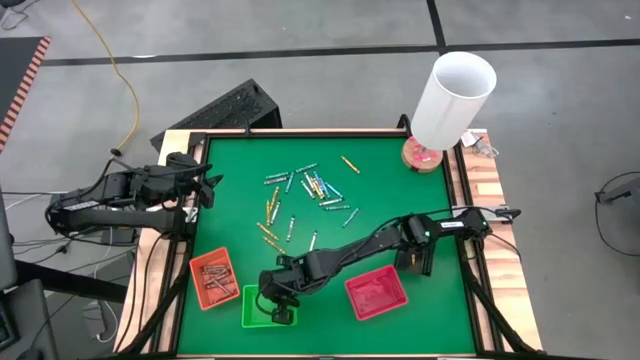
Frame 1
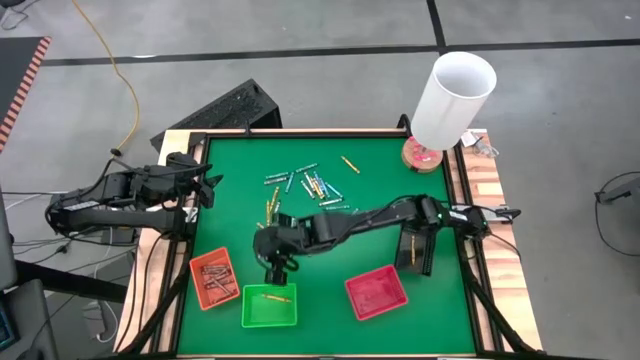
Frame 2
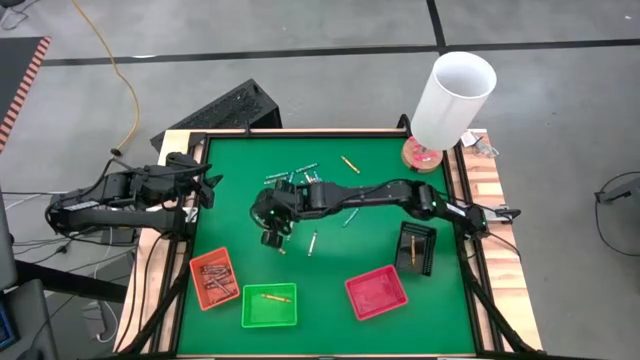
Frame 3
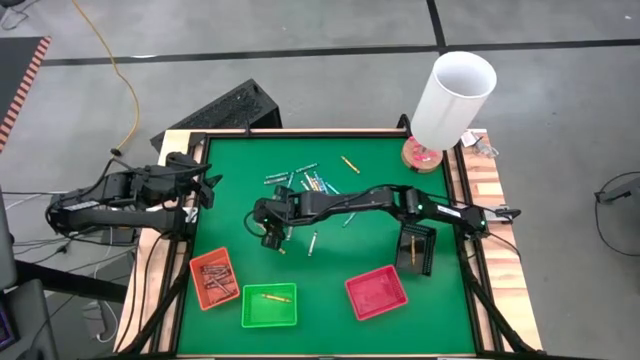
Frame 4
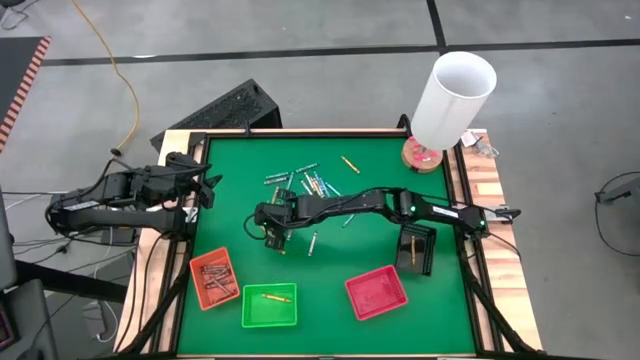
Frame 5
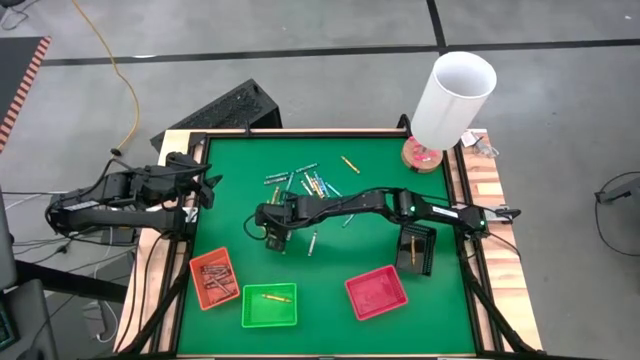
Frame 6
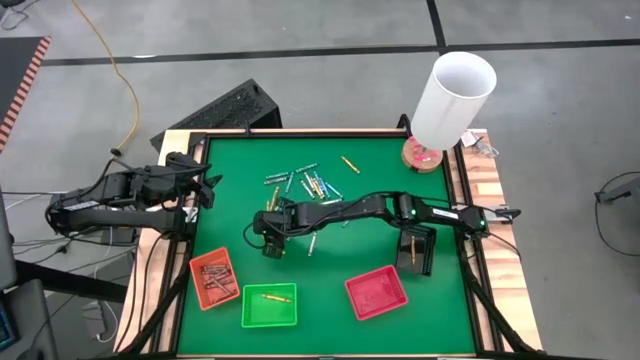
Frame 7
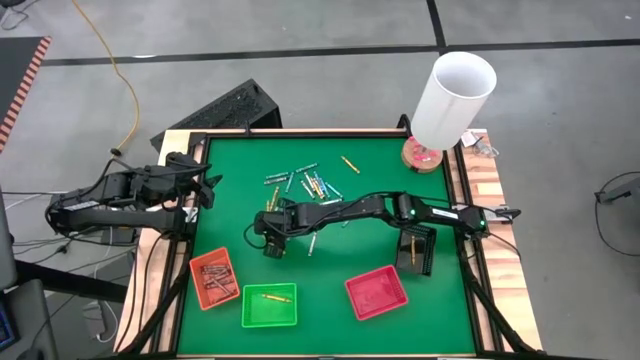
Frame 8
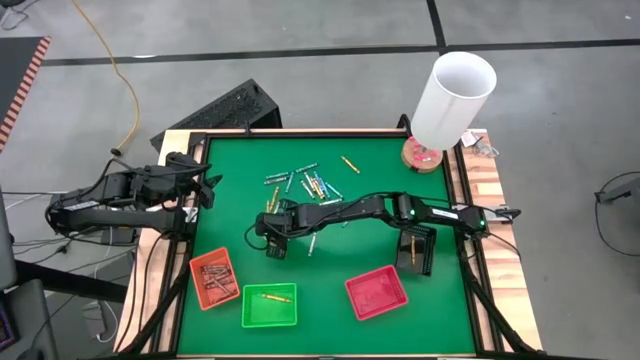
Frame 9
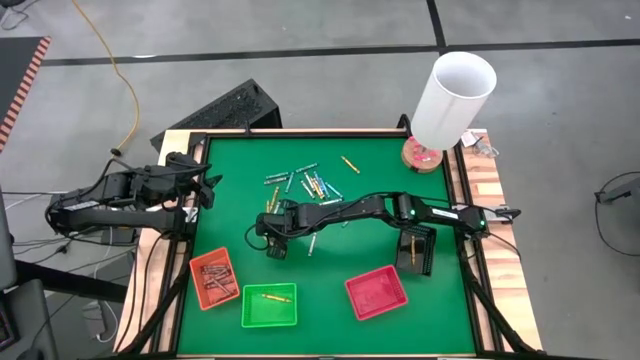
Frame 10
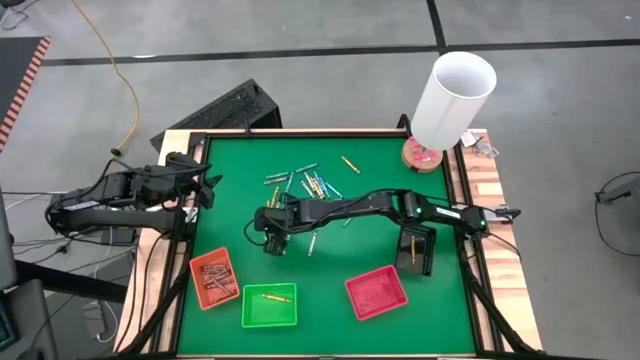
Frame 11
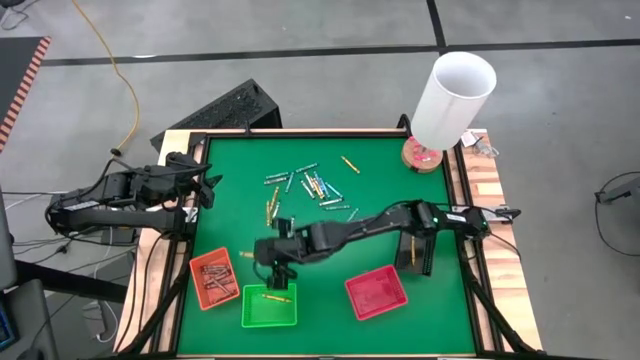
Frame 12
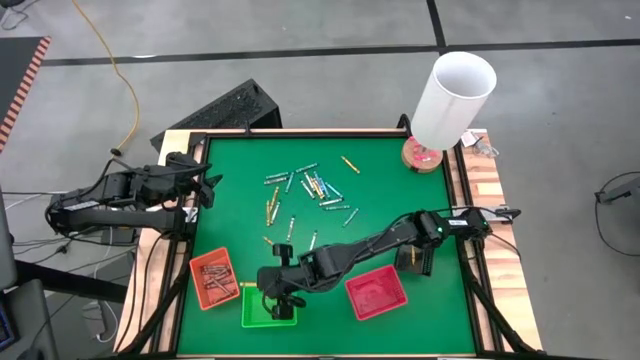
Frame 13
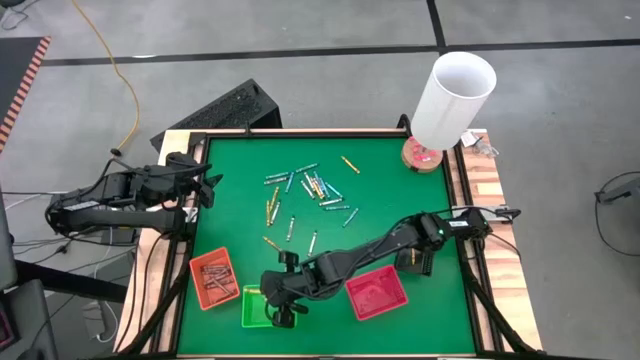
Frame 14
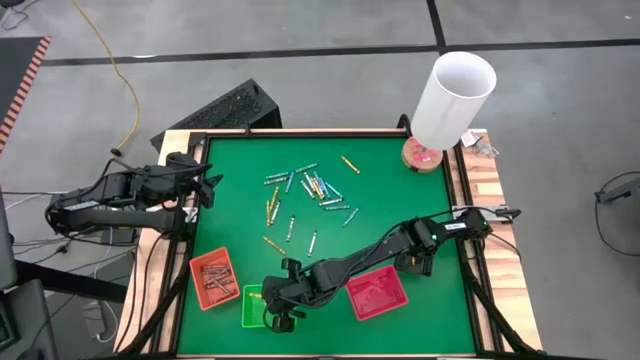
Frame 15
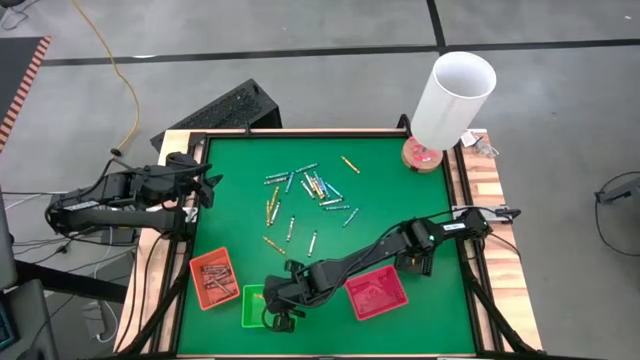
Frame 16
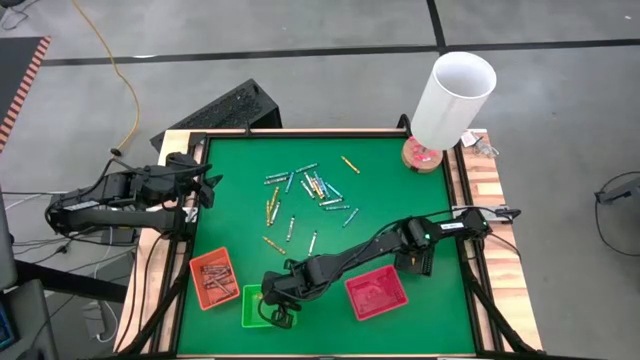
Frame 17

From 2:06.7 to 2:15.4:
Task: Sort crayons
Put the yellow crayon into the green bin

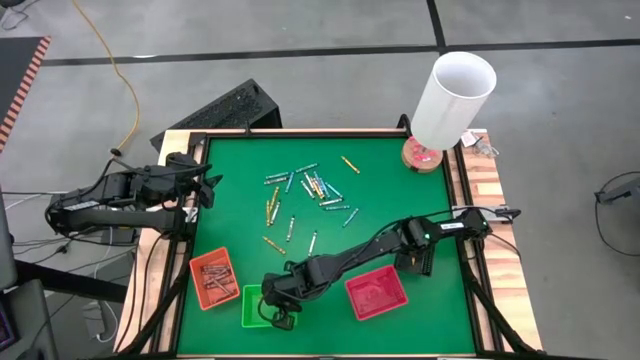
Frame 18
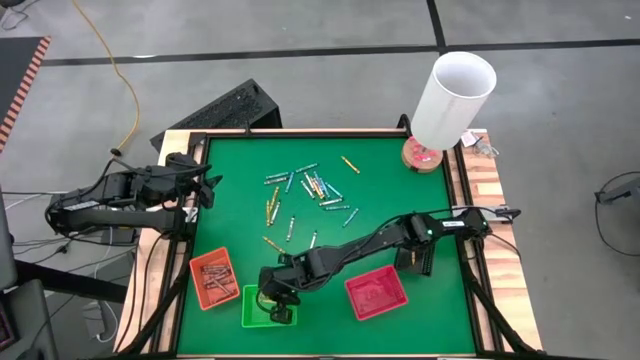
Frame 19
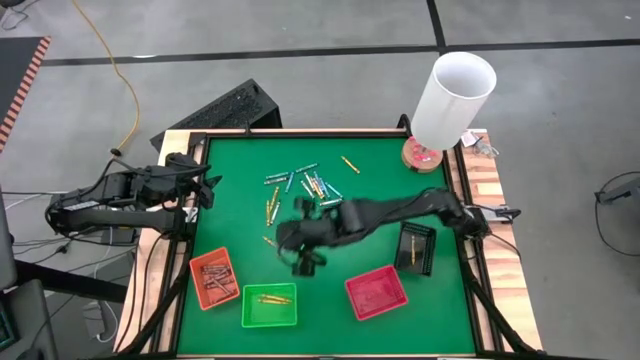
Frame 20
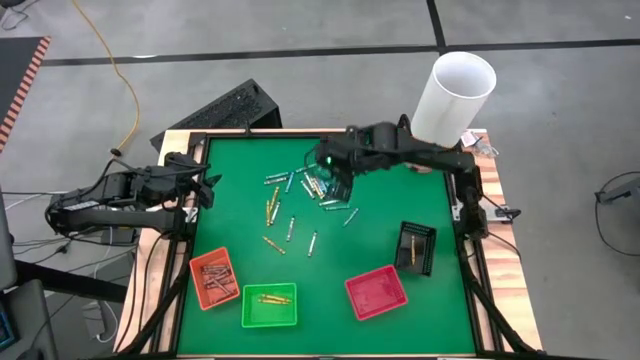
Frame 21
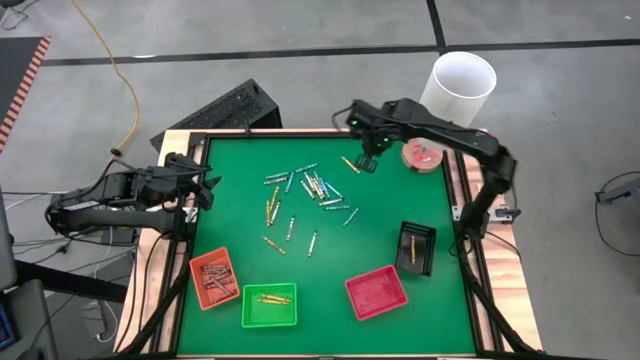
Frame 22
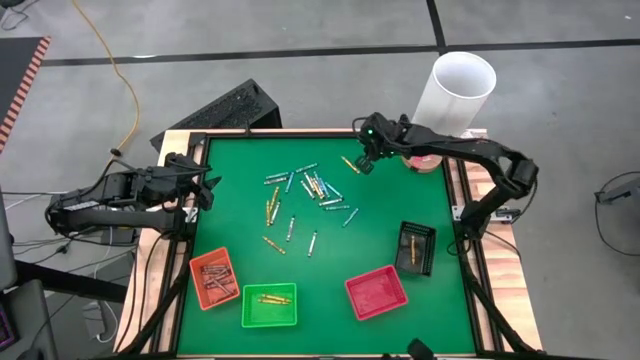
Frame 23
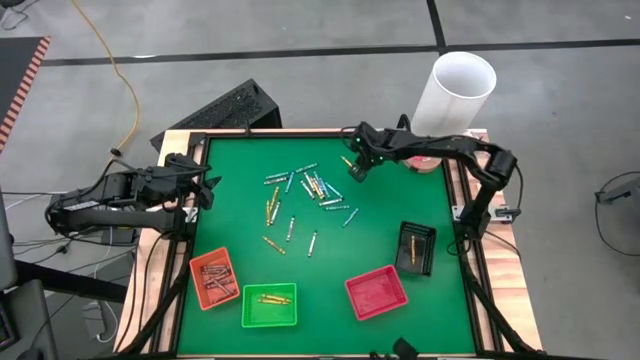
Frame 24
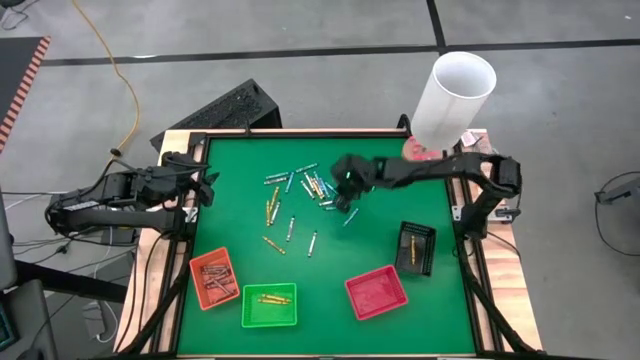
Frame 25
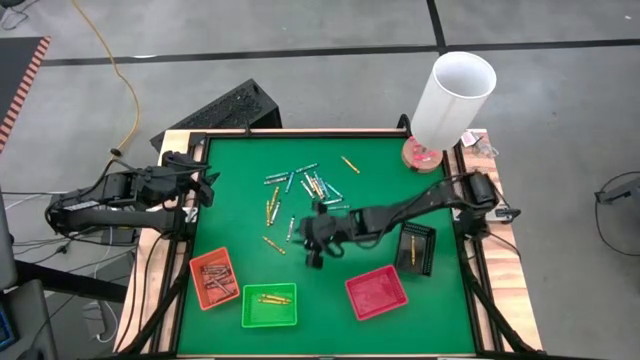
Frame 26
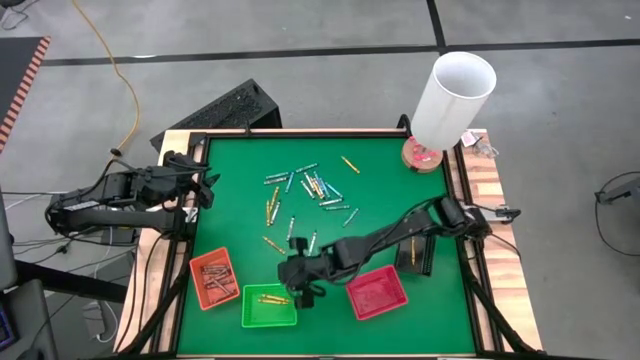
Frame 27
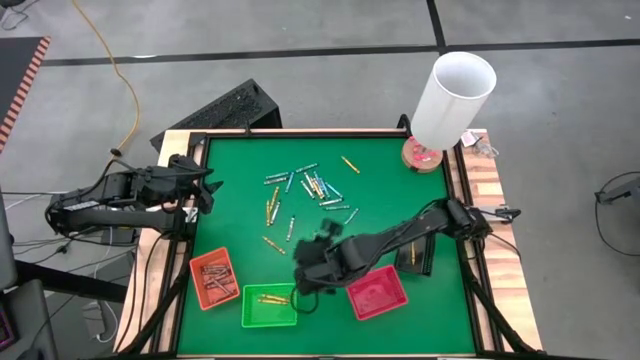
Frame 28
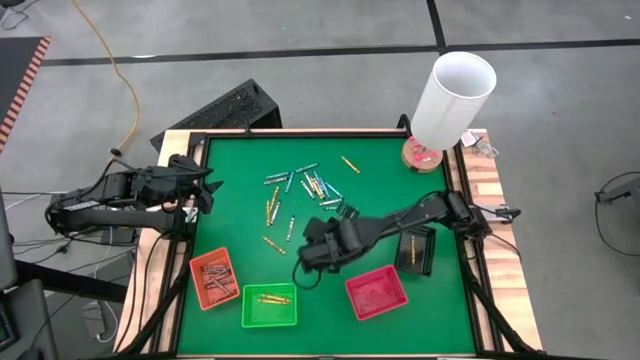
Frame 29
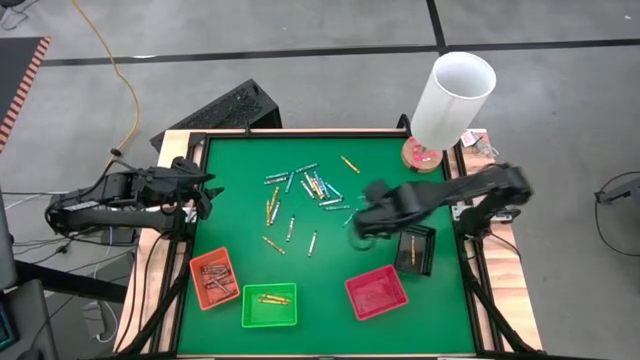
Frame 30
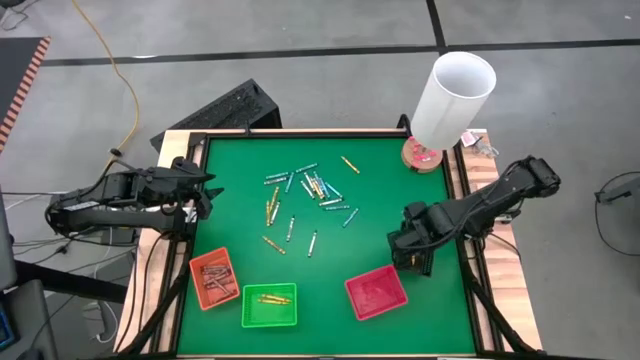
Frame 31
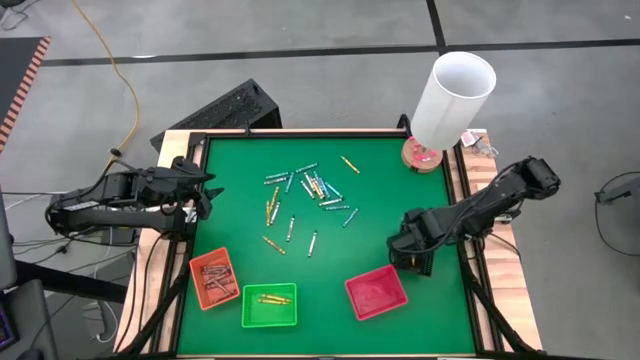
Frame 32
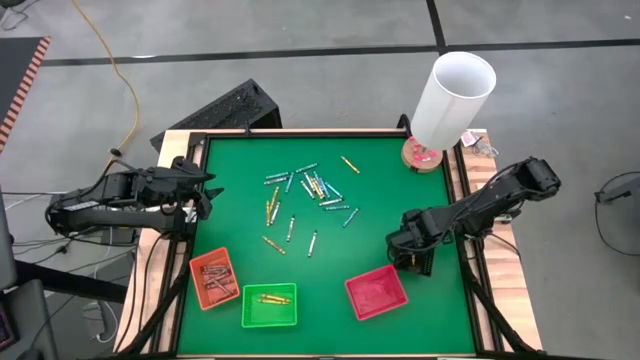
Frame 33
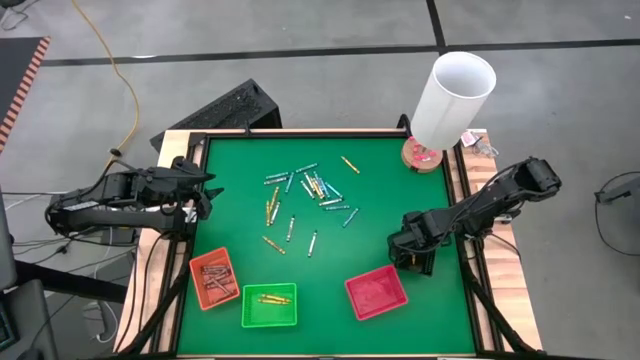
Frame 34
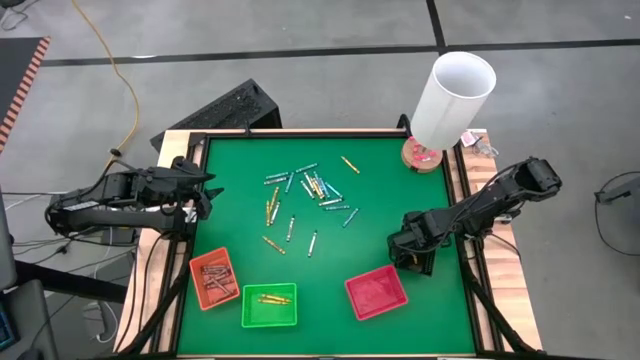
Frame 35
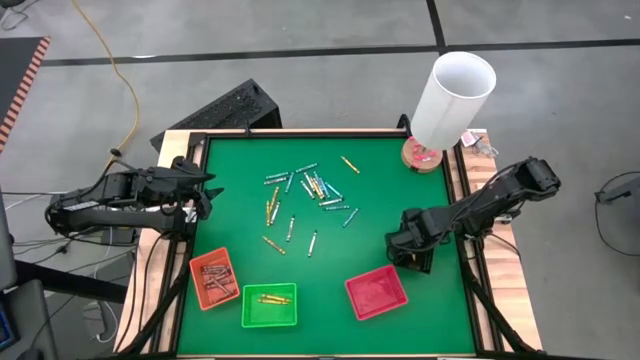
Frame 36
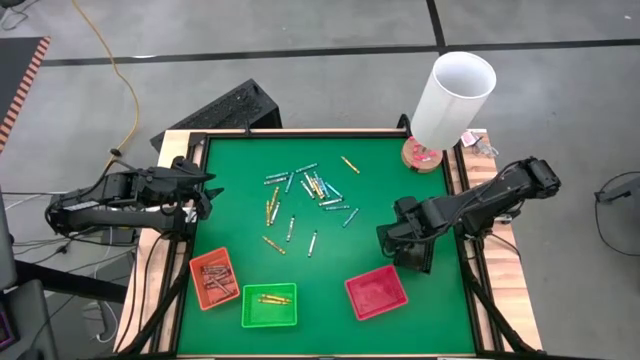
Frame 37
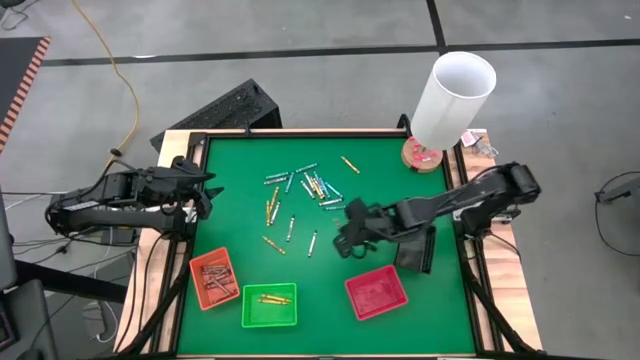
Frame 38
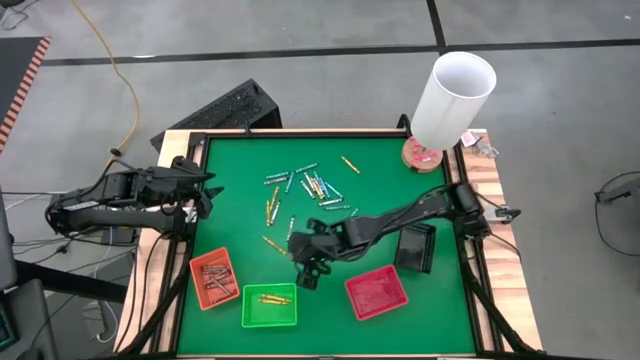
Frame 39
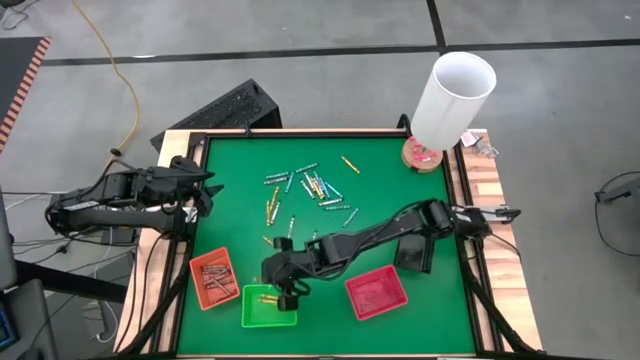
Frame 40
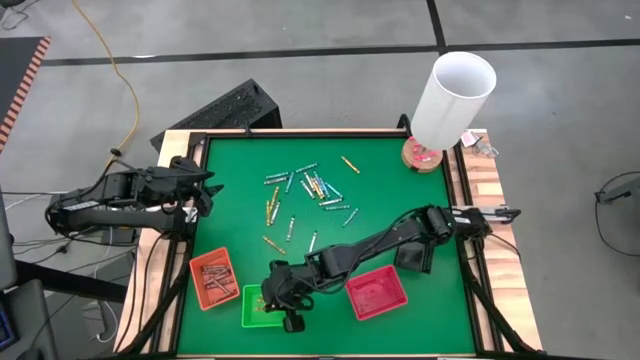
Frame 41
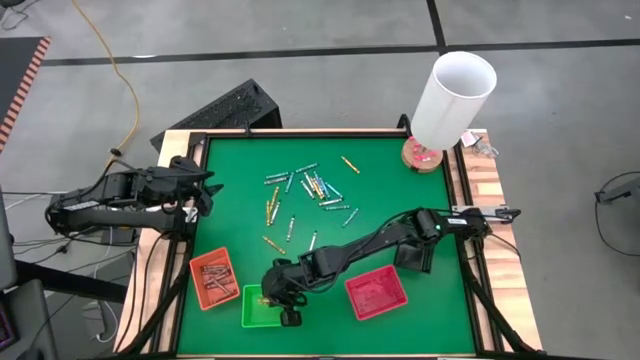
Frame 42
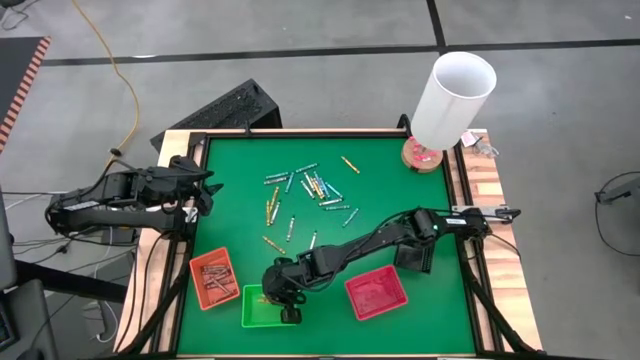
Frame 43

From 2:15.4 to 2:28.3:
Put the yellow crayon into the green bin
